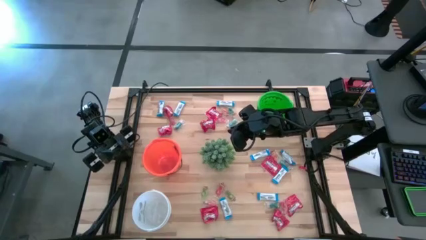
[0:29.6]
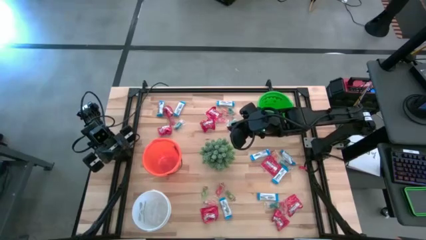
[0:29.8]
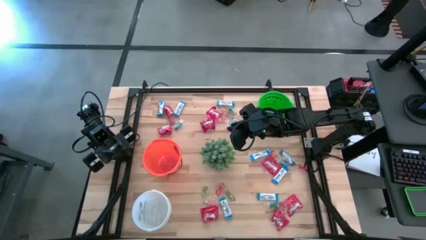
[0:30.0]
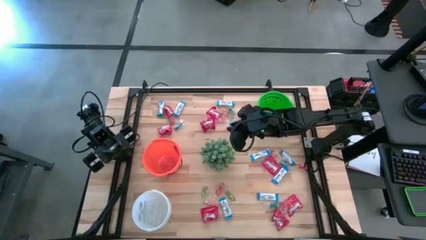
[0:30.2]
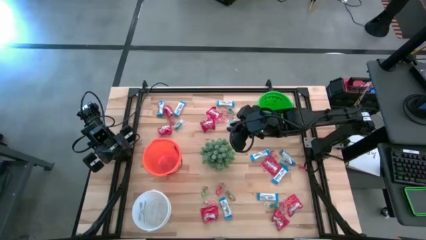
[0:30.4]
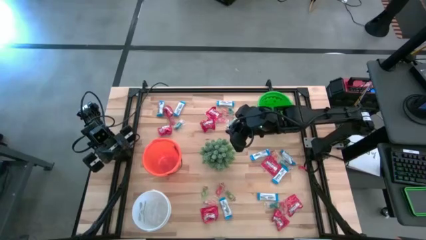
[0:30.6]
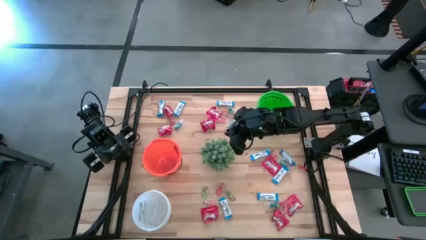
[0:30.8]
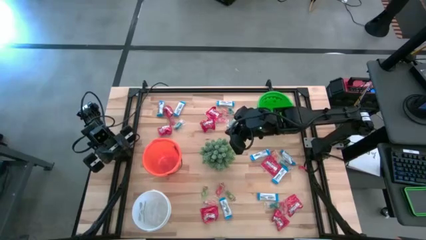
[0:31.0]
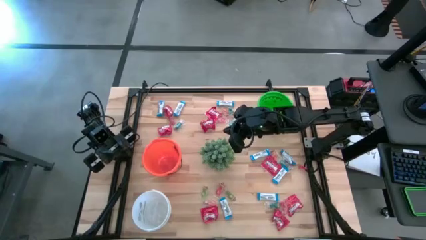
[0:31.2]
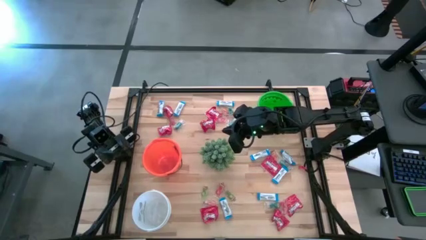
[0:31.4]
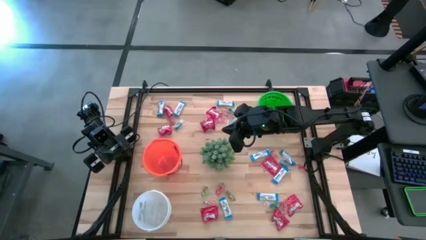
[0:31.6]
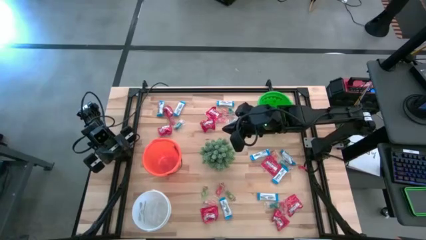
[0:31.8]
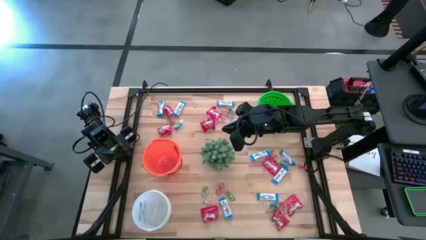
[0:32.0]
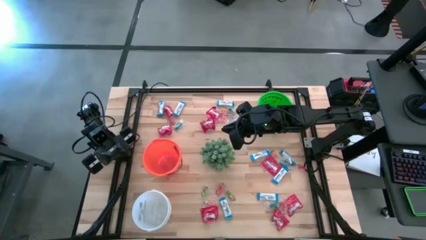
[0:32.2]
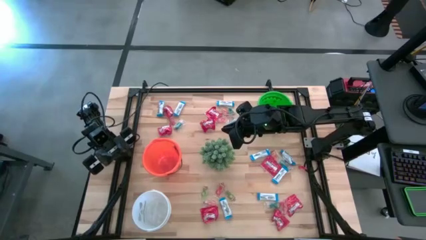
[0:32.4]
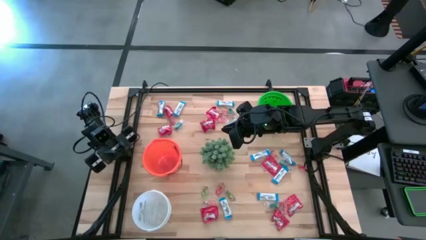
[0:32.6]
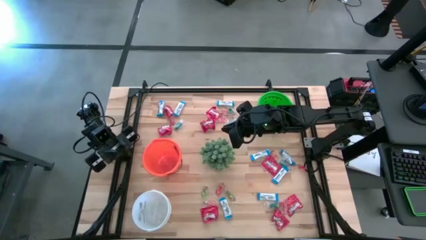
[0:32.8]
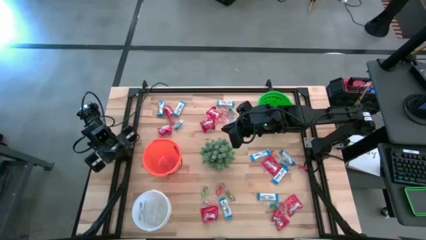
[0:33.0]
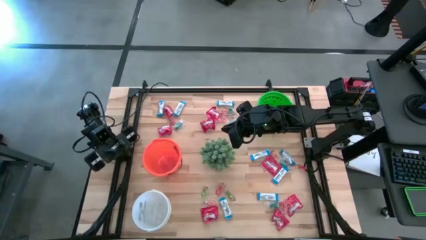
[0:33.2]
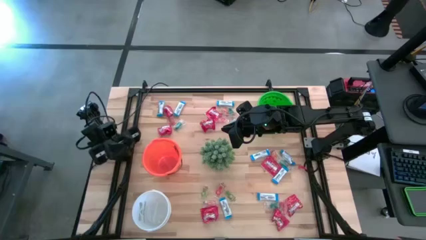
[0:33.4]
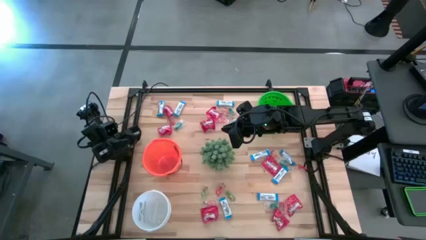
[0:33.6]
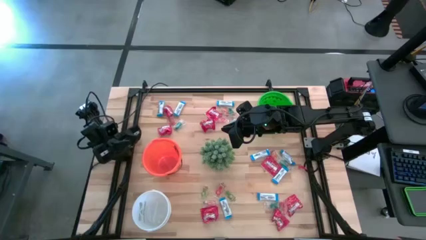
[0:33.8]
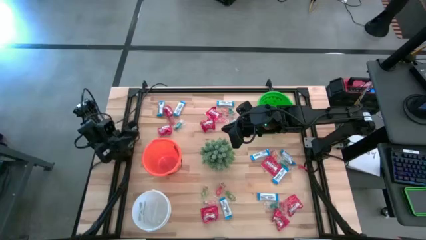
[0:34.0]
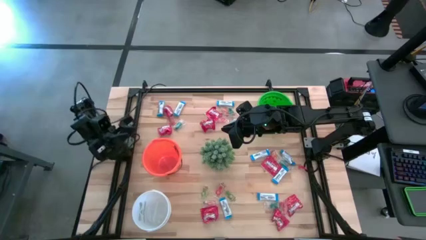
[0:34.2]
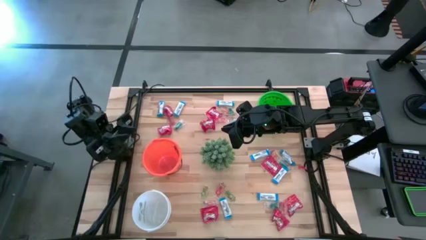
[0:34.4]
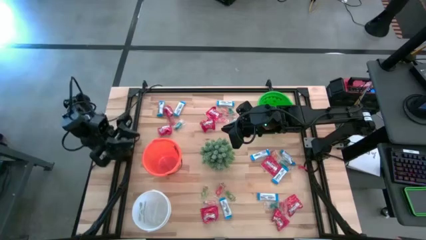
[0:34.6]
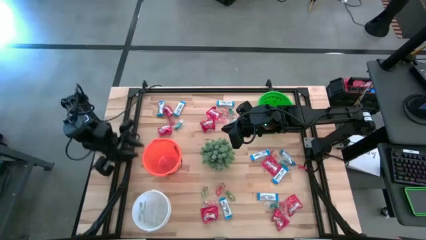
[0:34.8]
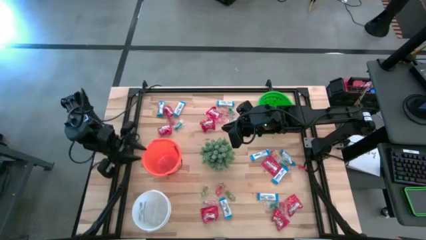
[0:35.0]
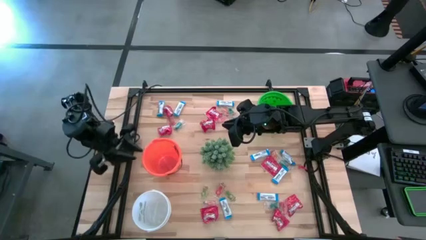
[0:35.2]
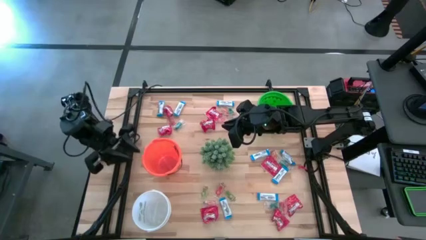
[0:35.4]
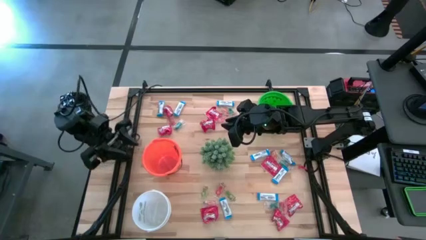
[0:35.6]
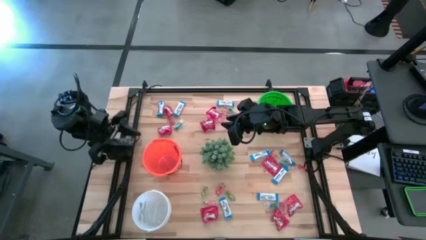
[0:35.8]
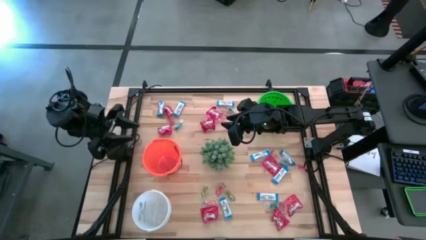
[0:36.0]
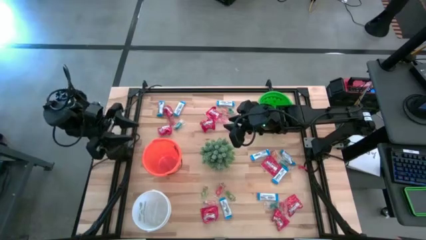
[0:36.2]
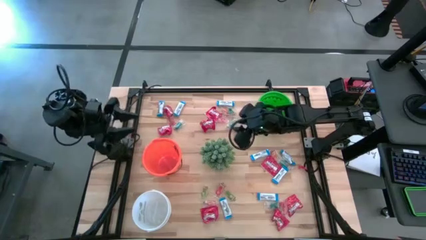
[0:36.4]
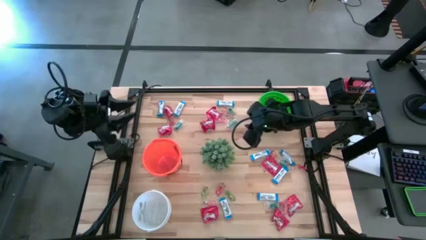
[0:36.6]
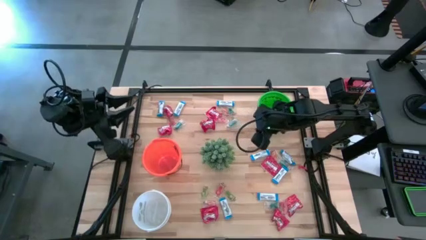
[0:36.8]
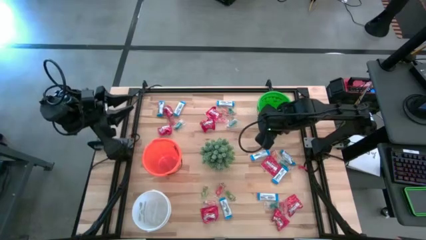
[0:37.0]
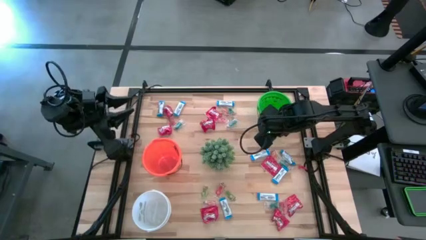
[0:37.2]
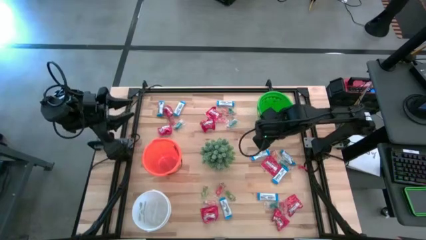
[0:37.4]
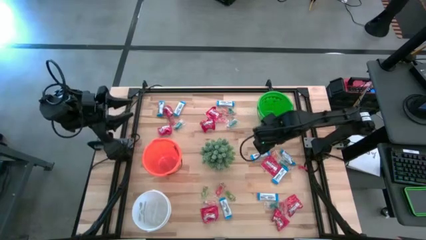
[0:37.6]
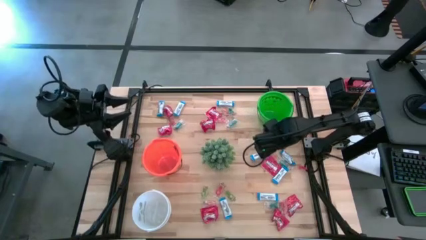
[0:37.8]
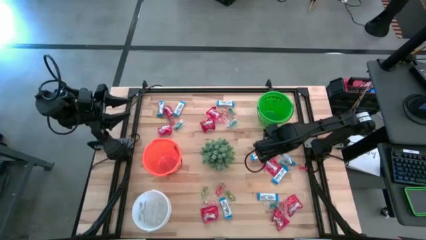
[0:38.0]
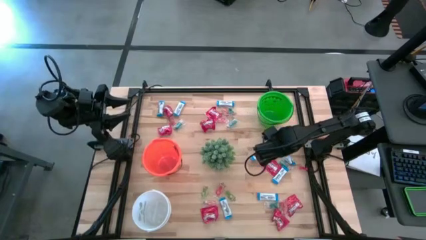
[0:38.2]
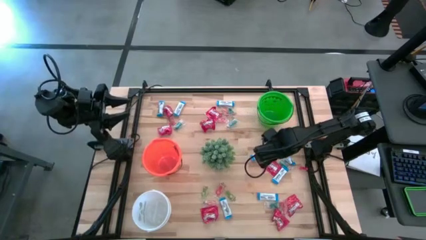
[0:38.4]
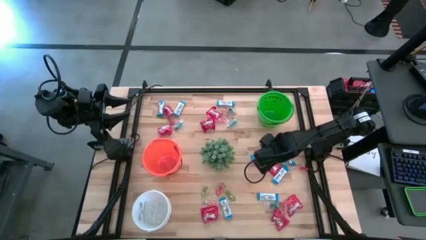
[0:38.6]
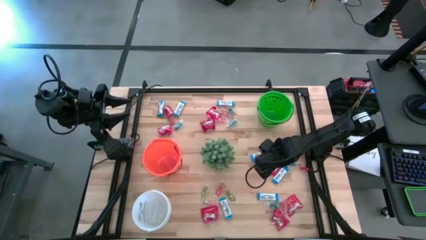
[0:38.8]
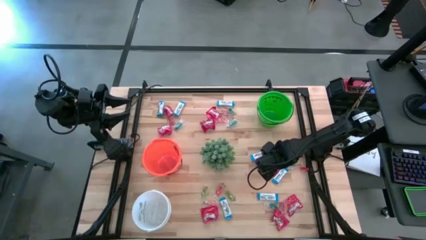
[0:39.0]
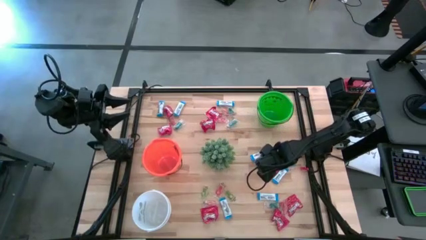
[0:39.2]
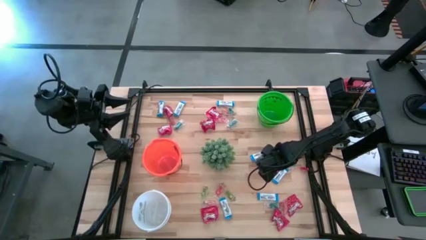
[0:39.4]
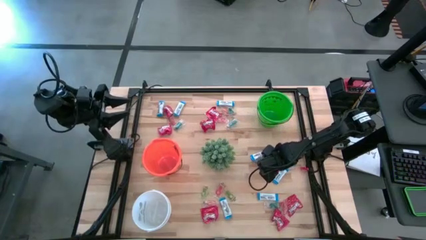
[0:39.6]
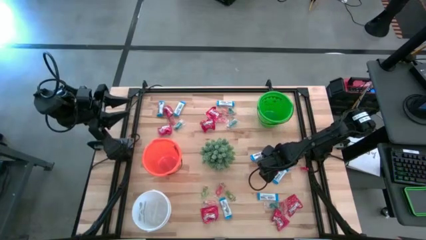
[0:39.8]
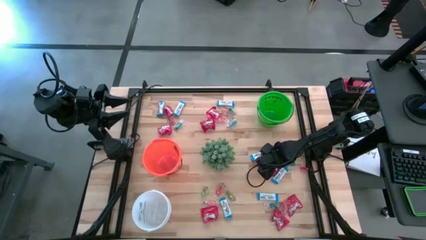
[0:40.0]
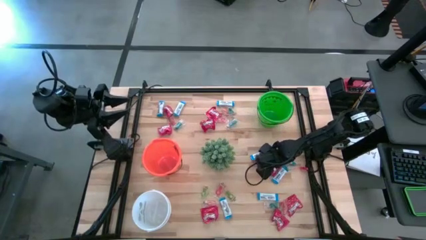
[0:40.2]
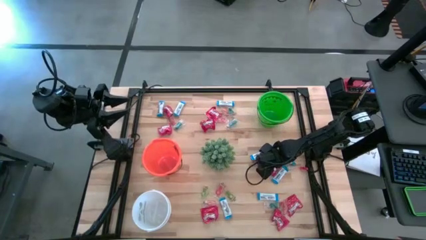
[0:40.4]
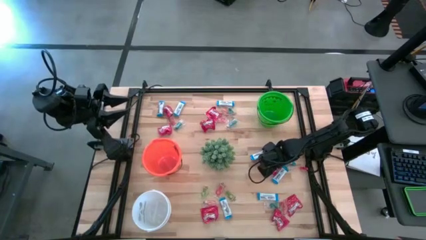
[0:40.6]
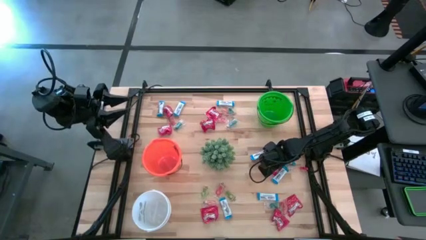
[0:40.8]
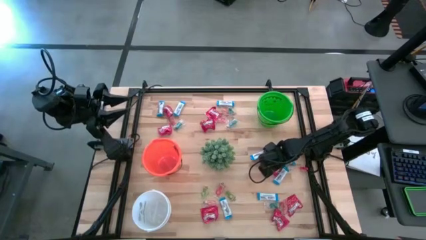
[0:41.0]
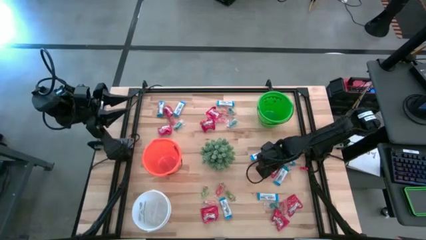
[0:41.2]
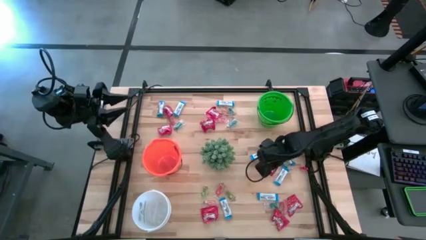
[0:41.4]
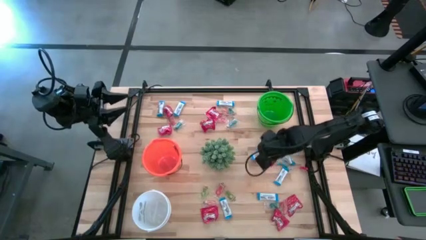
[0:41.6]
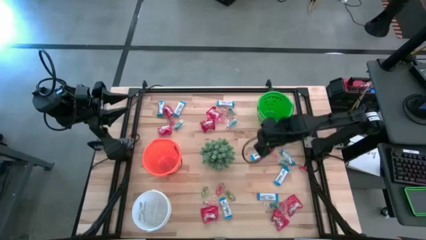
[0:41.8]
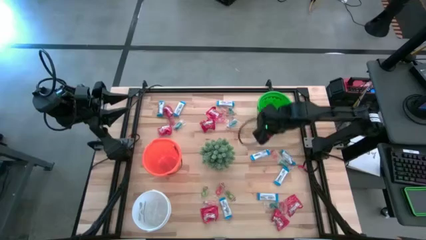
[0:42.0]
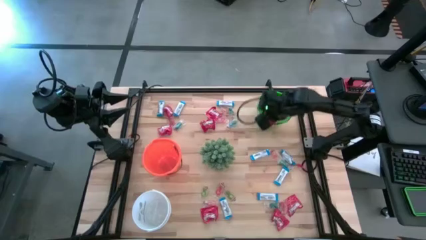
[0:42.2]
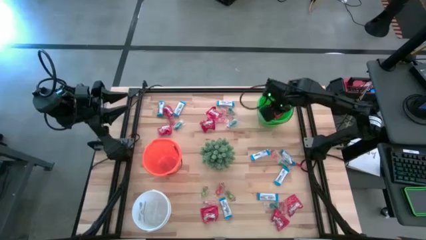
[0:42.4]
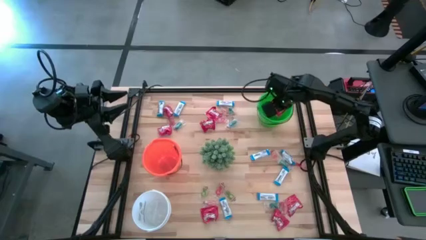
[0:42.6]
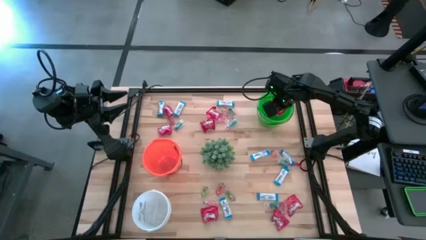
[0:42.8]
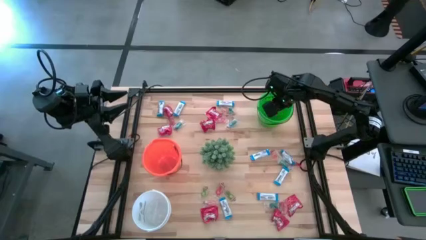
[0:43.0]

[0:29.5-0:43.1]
Task: Sort candy
Put the red candy into the green bucket
